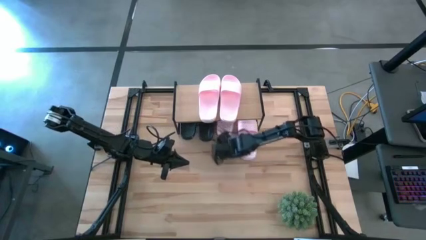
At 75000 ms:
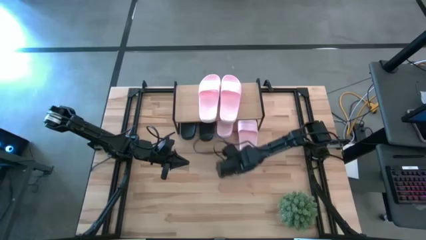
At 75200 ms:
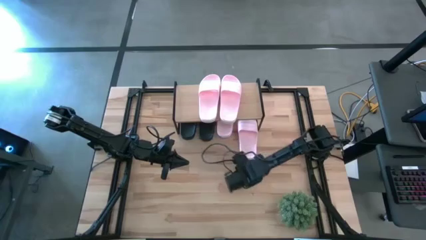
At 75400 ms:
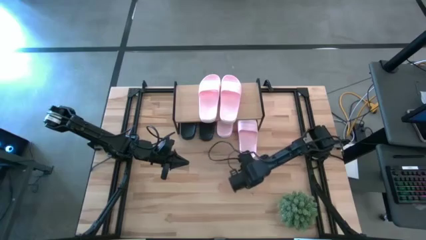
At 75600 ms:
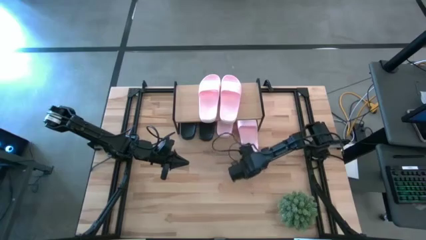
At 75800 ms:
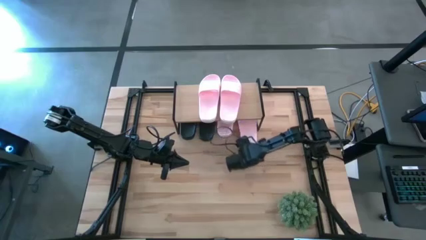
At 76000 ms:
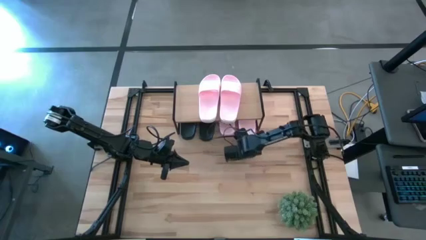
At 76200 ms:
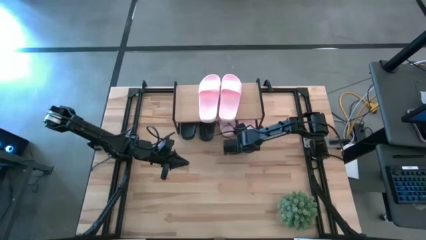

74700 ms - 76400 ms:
Task: Pick and place slides into the shelf
Adjust the pink slide under the shelf

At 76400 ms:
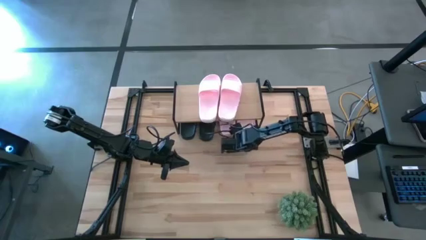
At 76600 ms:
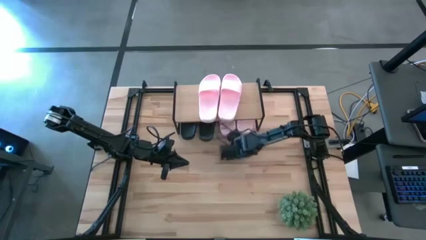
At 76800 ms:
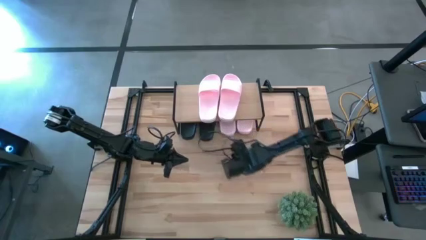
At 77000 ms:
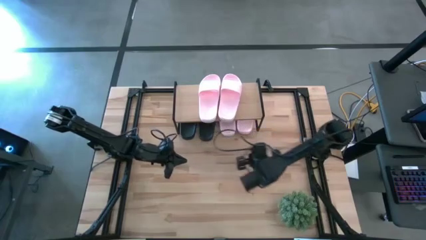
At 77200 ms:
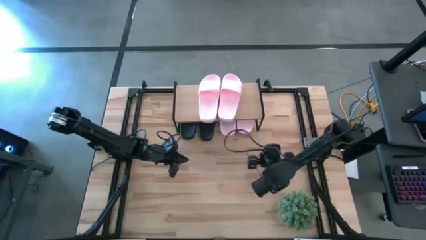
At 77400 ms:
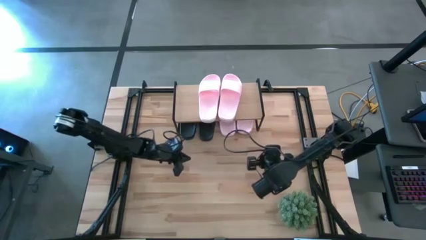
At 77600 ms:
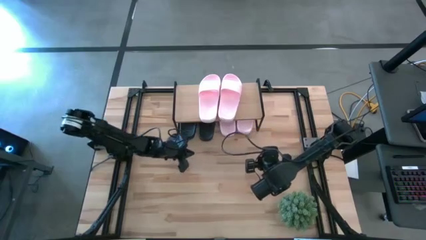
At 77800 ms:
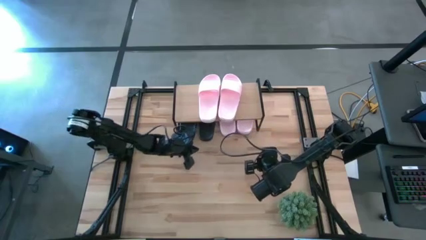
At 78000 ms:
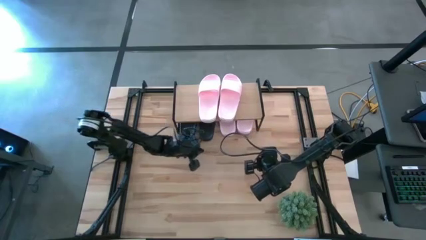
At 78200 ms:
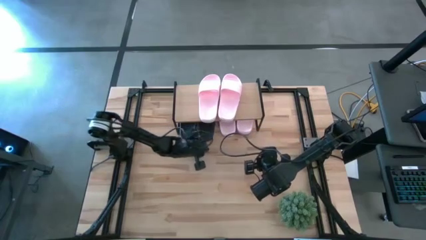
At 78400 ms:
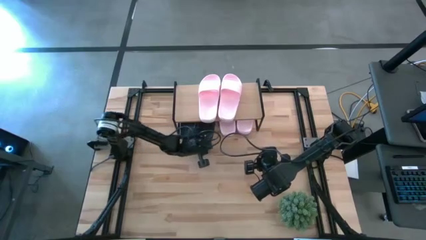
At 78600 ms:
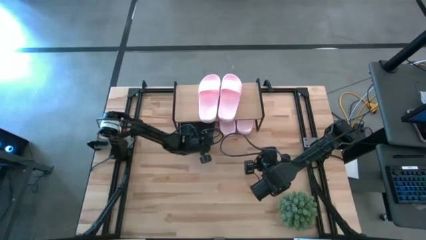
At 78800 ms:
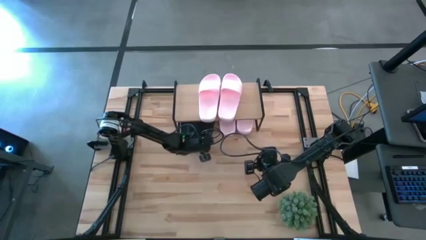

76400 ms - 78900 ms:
Adjust the black slide under the shelf

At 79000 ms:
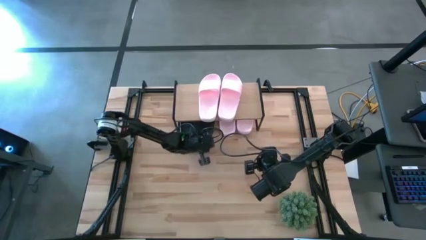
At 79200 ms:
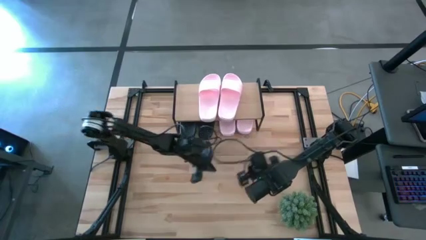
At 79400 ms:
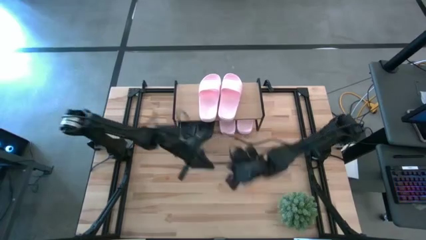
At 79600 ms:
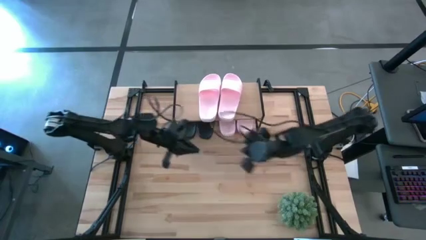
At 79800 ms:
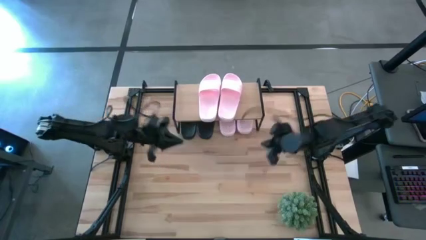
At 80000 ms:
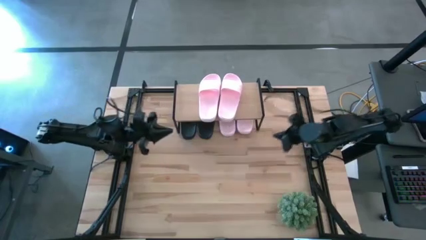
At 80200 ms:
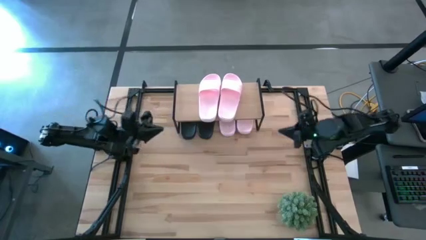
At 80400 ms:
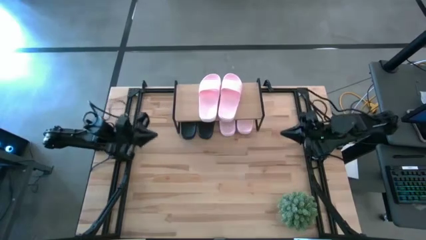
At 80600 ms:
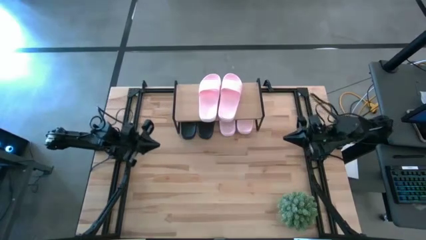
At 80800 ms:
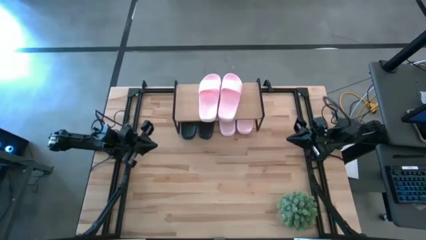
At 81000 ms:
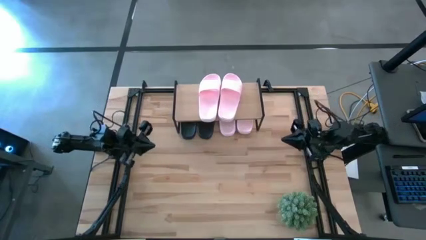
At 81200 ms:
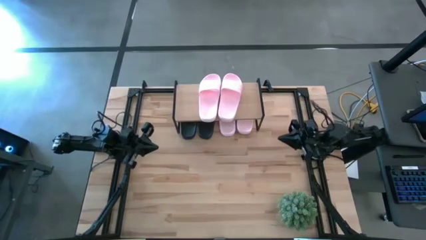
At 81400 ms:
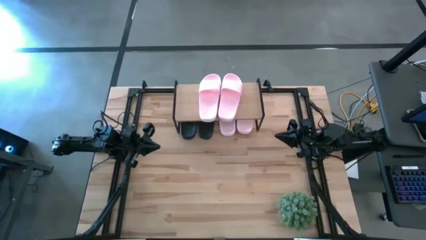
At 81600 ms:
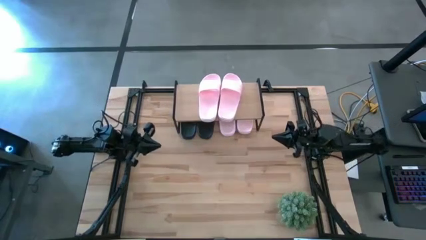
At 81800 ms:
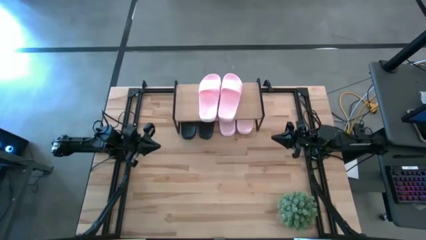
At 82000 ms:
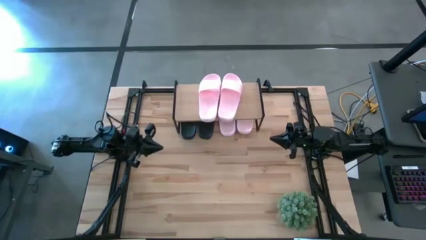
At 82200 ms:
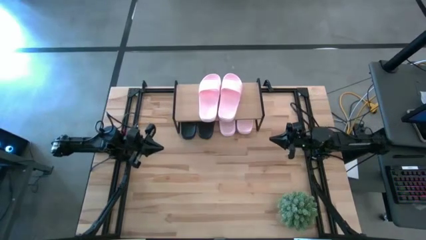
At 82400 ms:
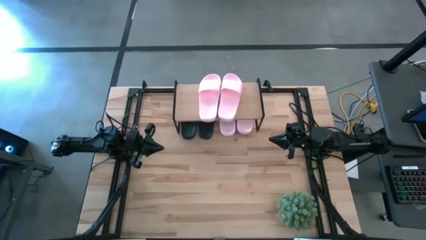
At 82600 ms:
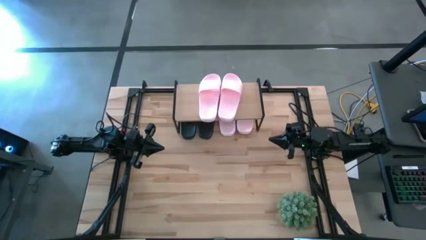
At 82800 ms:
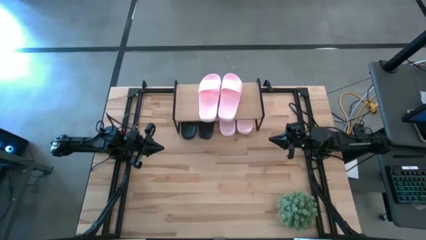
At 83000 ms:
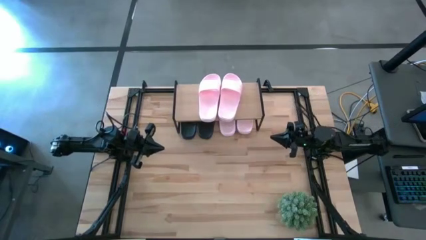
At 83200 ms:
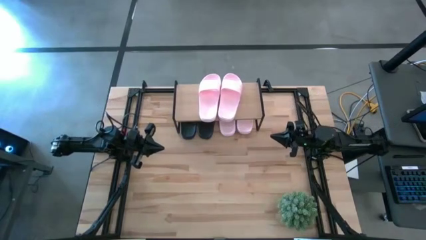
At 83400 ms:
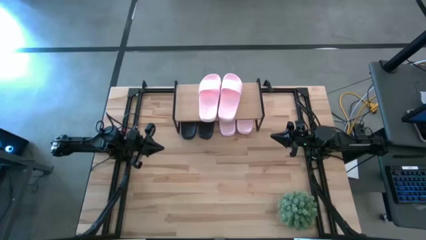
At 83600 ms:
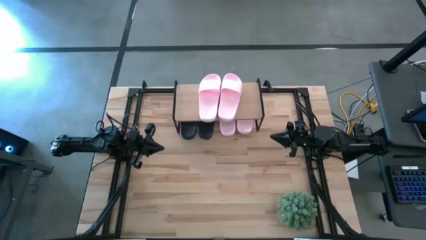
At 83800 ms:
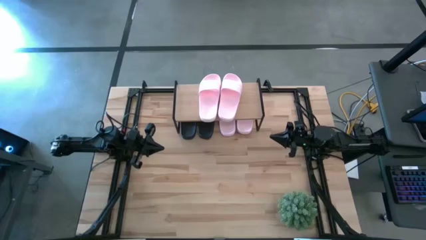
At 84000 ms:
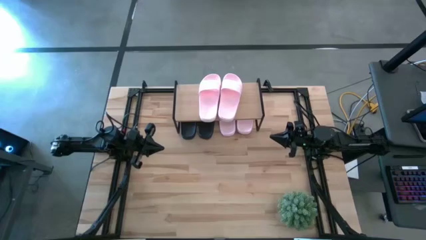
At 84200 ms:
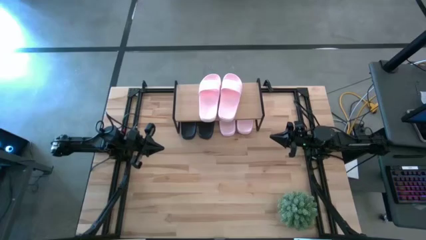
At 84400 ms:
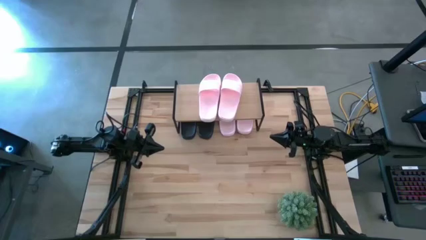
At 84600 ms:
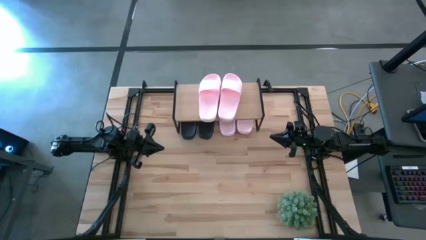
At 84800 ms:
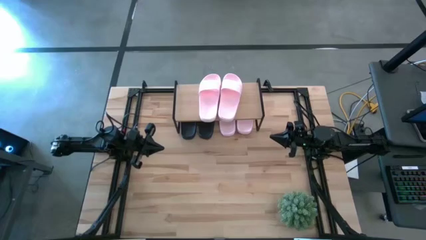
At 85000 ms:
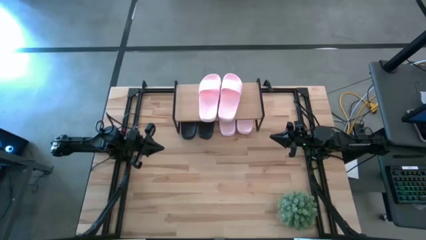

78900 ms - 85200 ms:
Return to Home Position
